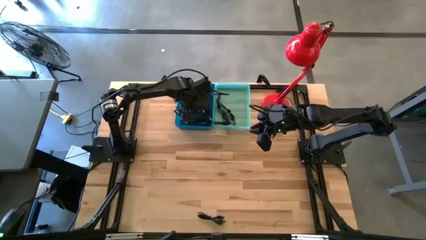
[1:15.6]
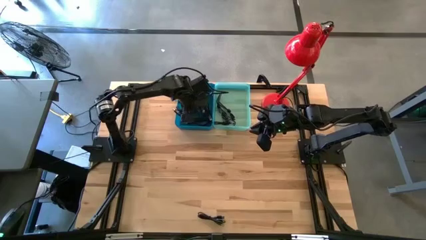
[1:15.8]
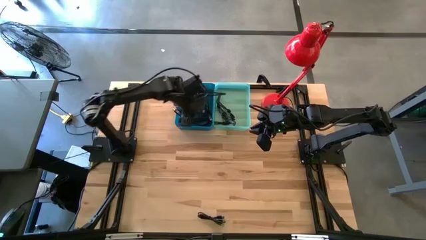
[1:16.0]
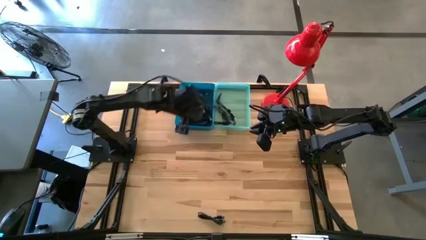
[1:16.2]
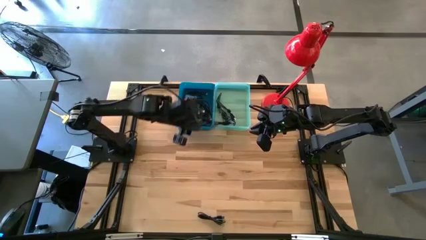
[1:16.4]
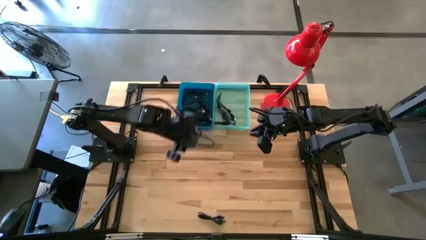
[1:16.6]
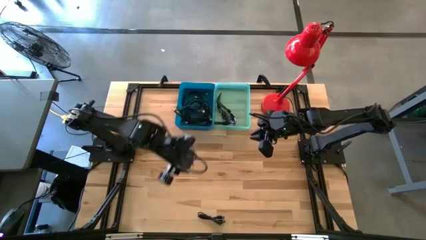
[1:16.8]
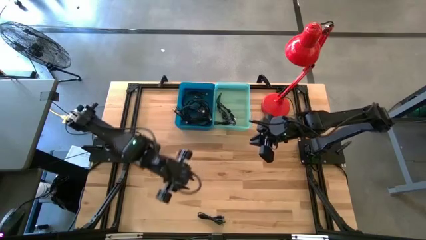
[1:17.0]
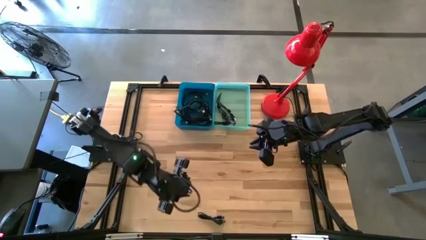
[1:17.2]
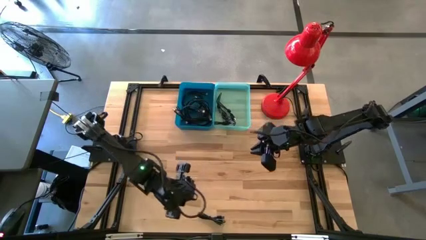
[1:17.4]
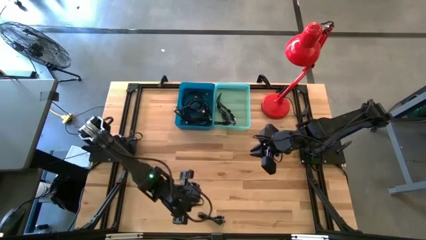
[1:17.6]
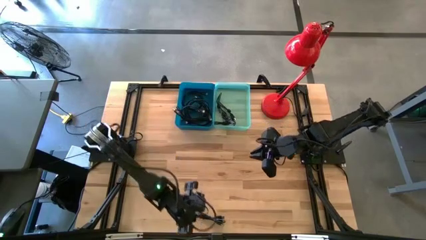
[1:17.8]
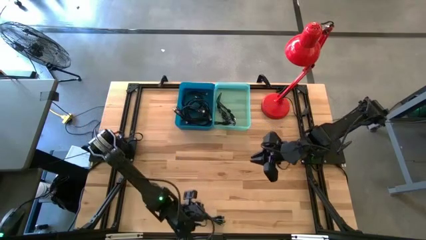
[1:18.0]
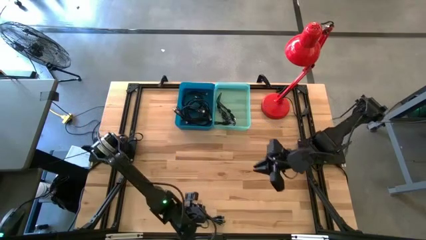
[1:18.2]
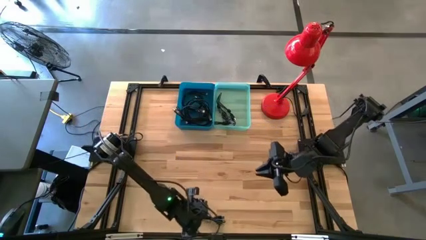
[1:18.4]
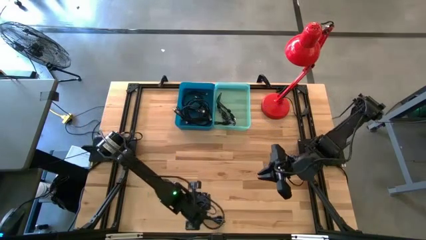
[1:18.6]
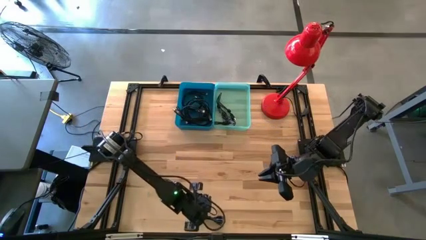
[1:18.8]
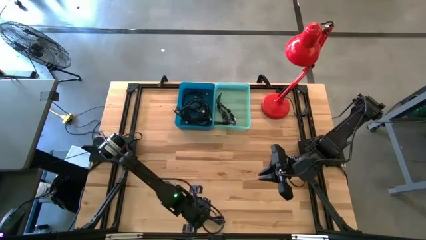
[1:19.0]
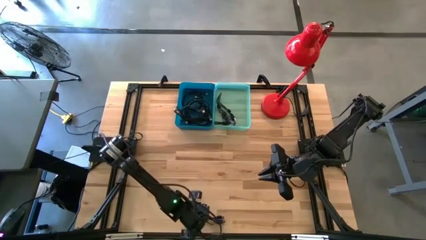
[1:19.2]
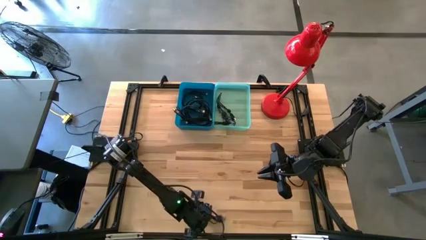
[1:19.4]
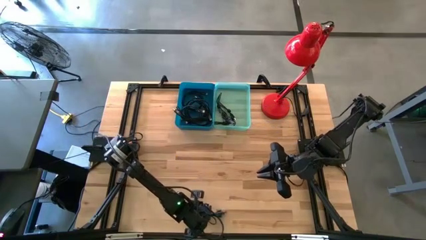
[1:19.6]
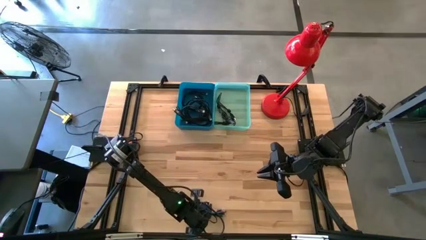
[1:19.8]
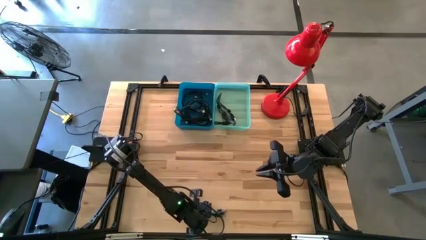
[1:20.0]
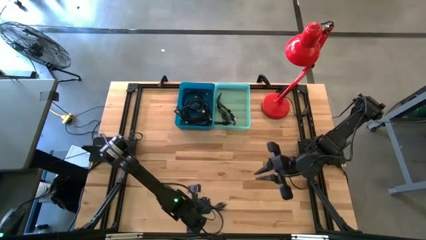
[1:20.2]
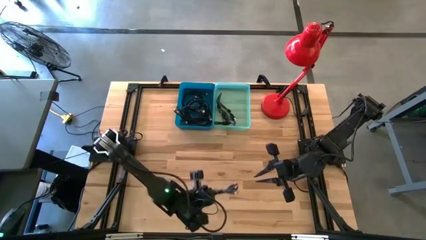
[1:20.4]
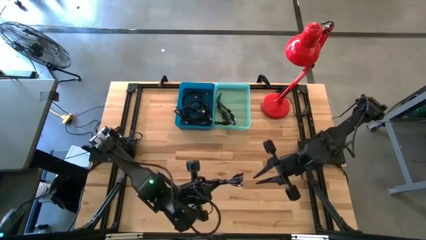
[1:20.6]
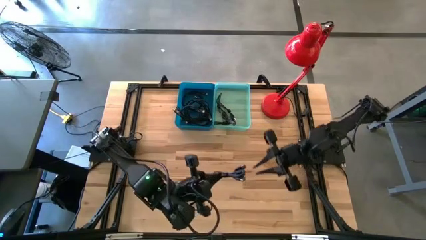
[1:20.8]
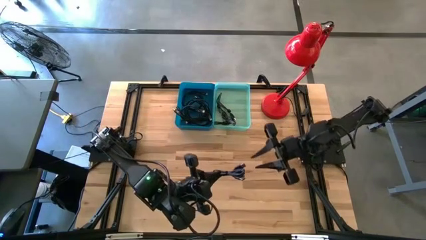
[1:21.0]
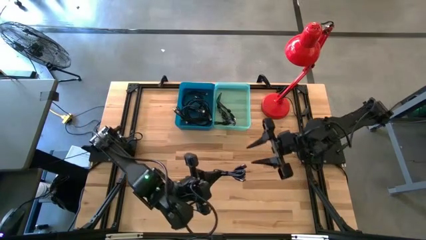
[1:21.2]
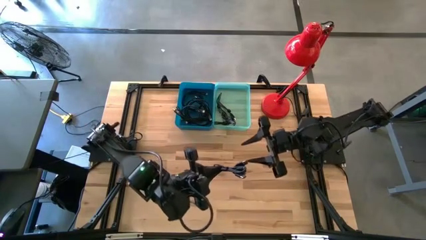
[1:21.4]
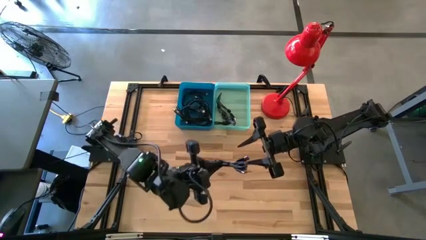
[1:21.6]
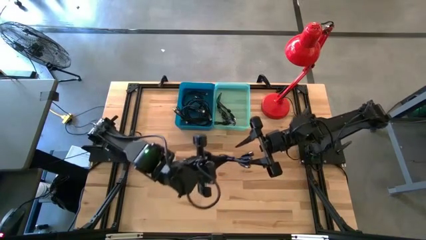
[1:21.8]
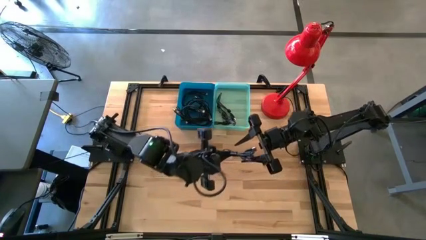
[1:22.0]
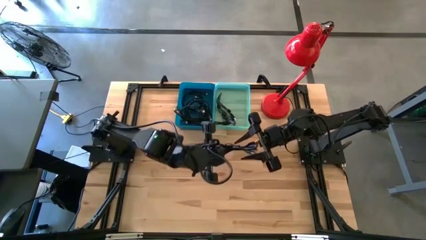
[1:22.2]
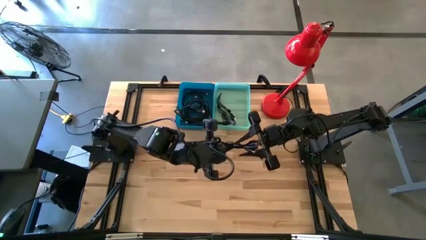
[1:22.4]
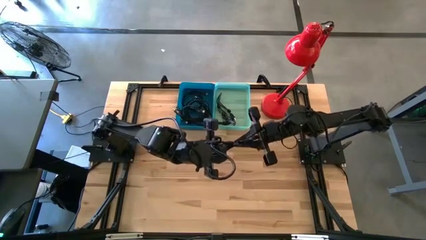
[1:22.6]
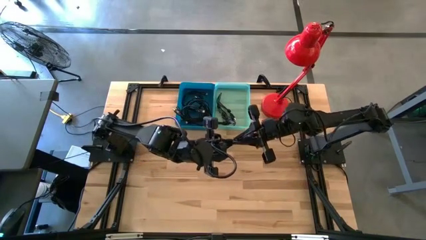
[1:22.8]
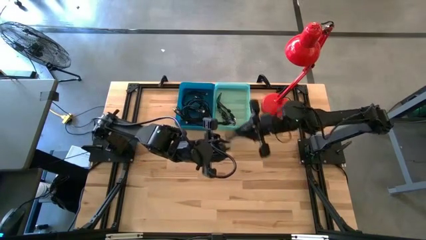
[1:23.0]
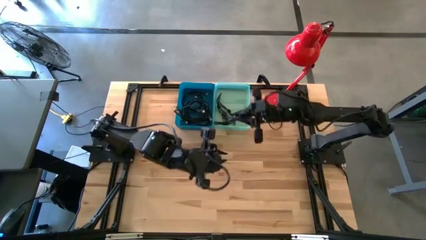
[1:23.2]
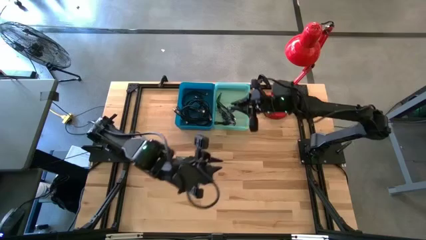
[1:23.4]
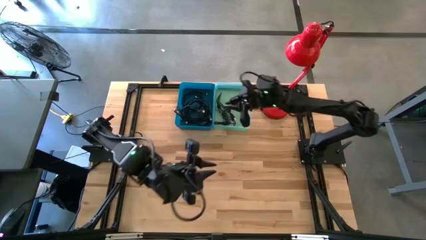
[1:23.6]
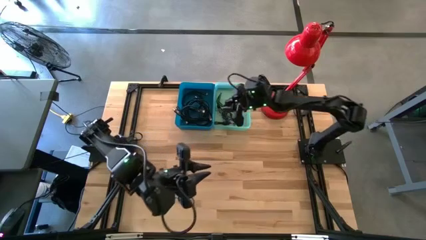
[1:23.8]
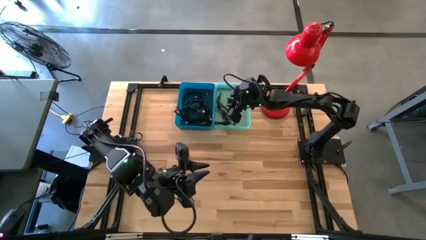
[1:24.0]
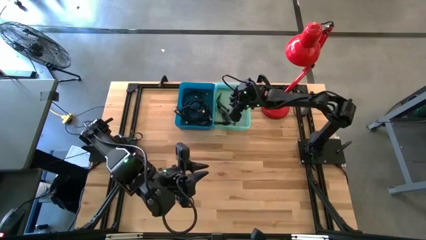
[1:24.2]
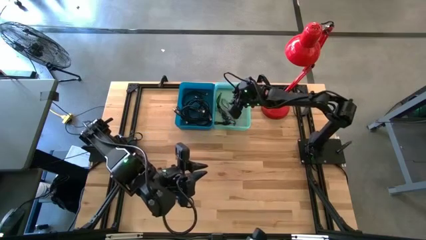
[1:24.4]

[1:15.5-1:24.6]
Task: Pick & Place USB Port
Put the black usb cable into the light blue bin

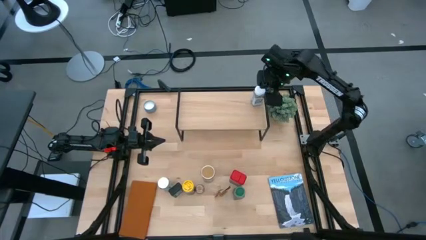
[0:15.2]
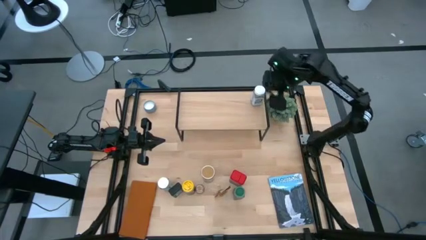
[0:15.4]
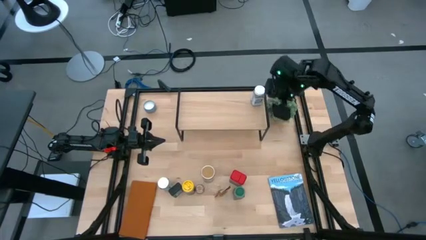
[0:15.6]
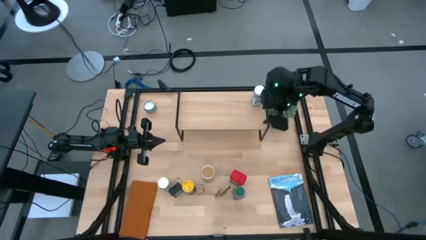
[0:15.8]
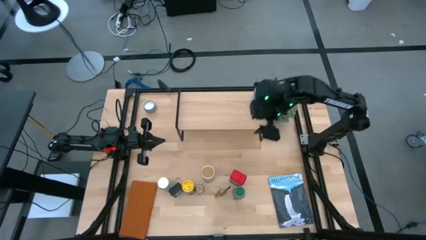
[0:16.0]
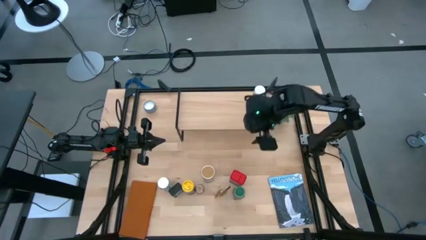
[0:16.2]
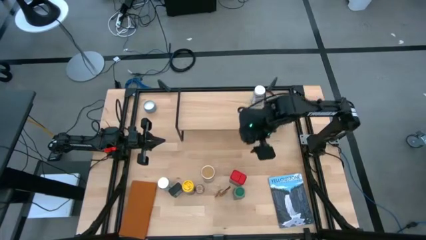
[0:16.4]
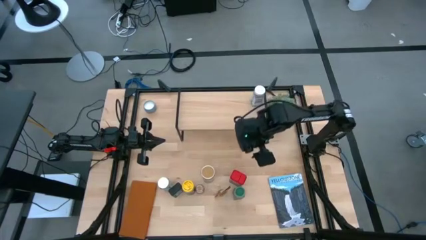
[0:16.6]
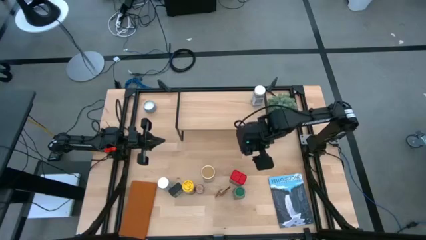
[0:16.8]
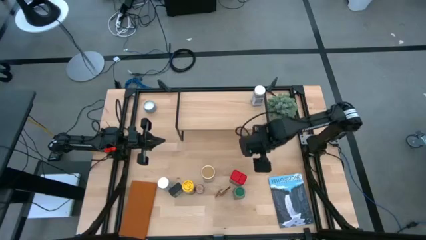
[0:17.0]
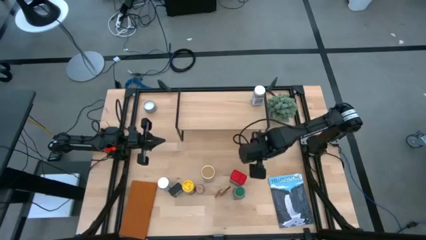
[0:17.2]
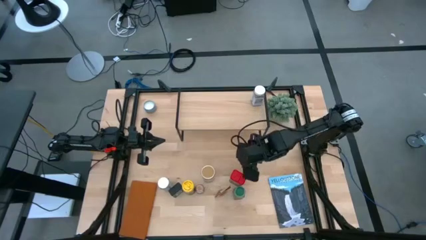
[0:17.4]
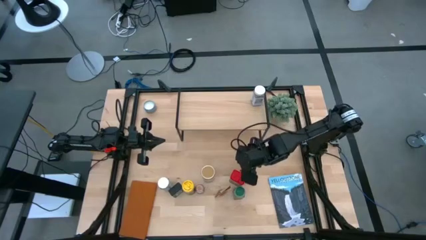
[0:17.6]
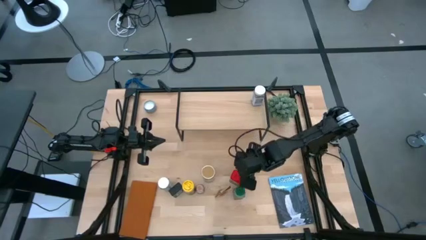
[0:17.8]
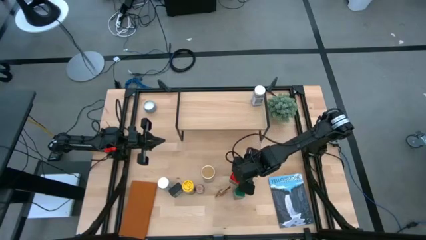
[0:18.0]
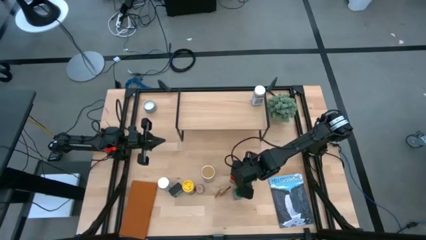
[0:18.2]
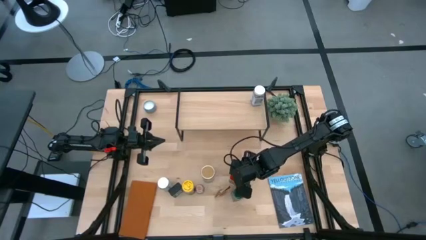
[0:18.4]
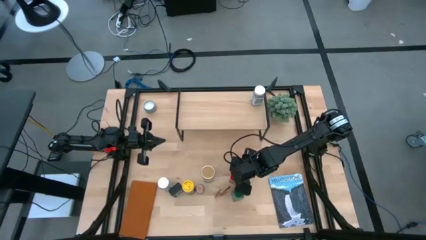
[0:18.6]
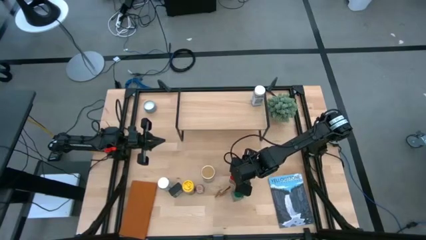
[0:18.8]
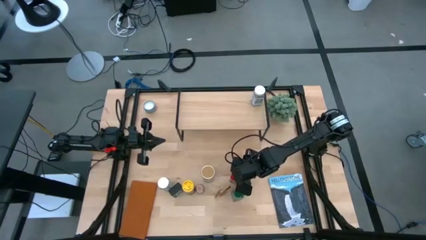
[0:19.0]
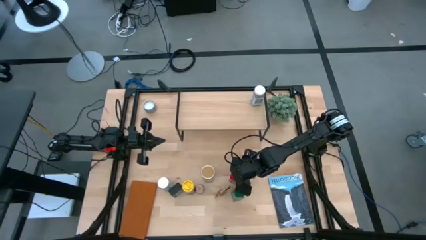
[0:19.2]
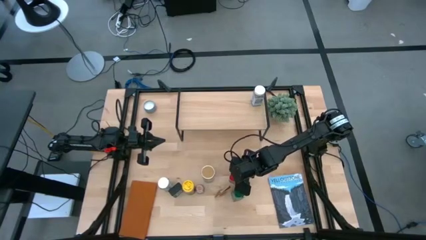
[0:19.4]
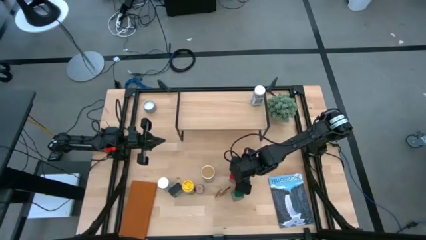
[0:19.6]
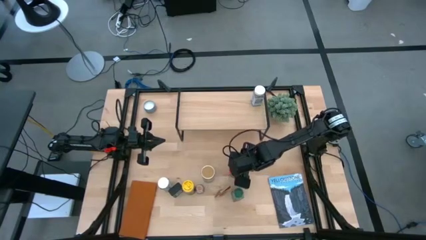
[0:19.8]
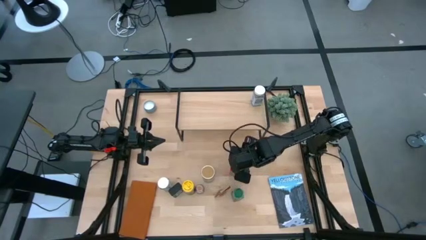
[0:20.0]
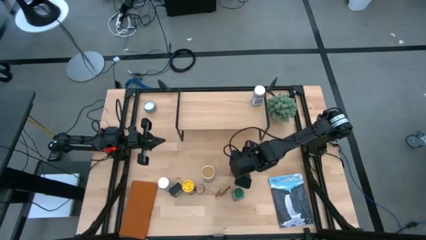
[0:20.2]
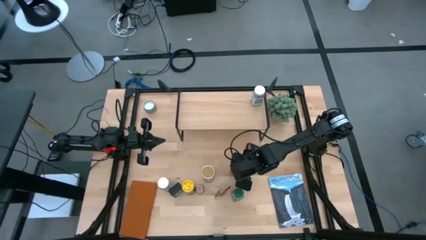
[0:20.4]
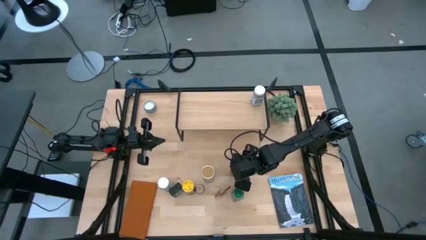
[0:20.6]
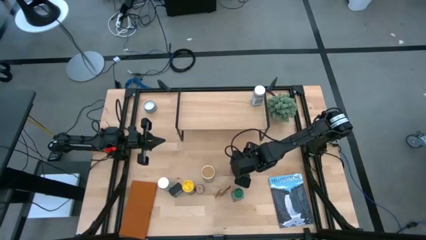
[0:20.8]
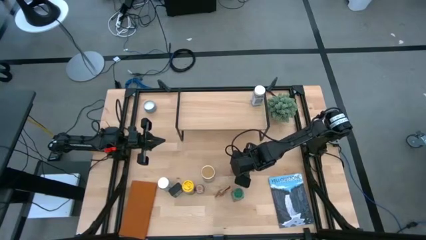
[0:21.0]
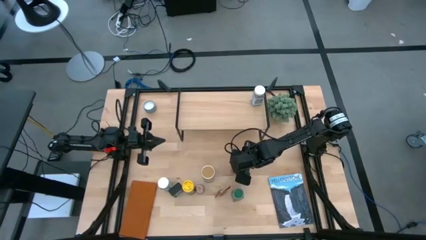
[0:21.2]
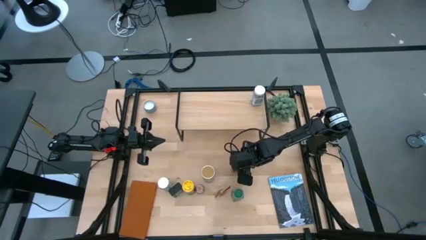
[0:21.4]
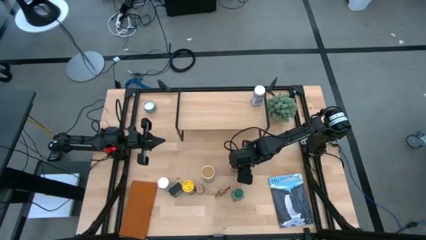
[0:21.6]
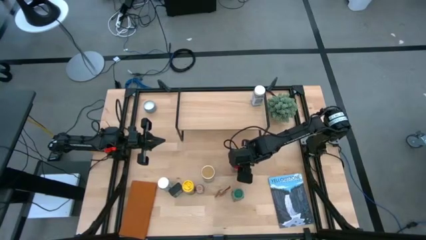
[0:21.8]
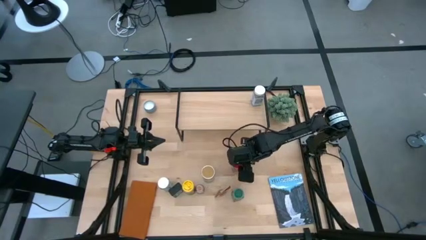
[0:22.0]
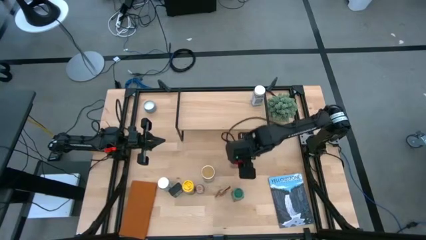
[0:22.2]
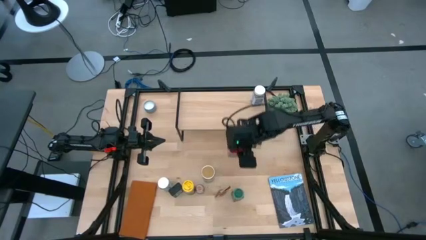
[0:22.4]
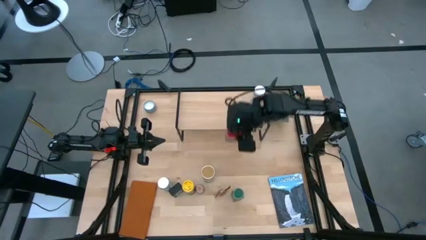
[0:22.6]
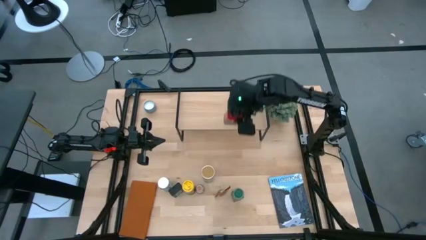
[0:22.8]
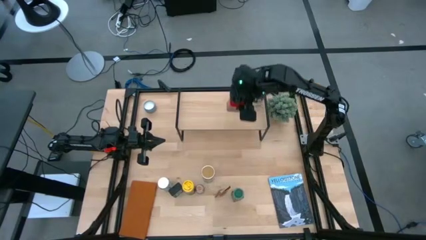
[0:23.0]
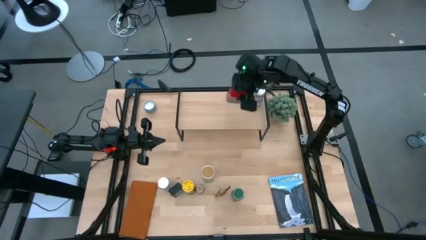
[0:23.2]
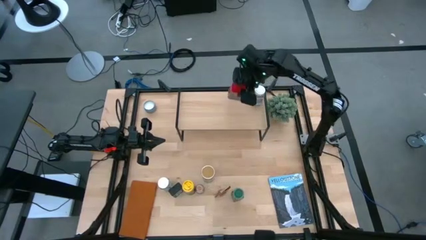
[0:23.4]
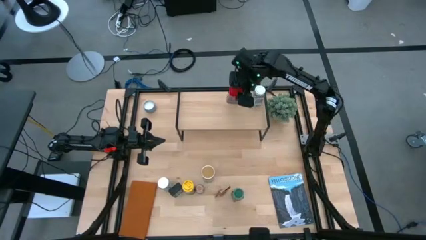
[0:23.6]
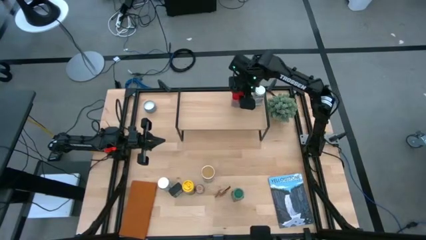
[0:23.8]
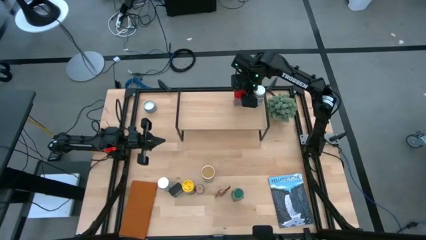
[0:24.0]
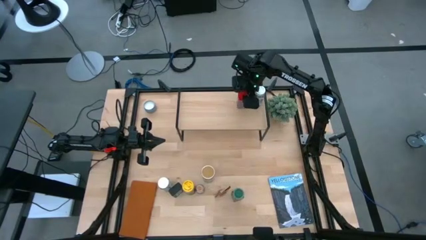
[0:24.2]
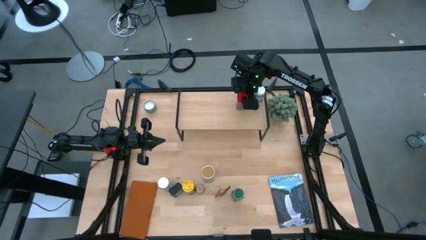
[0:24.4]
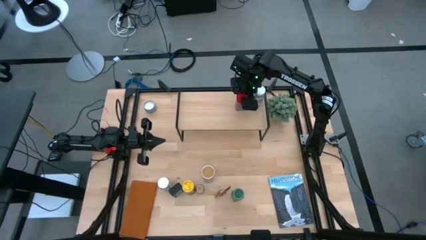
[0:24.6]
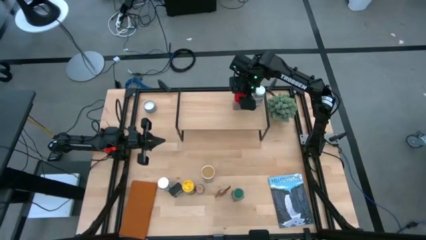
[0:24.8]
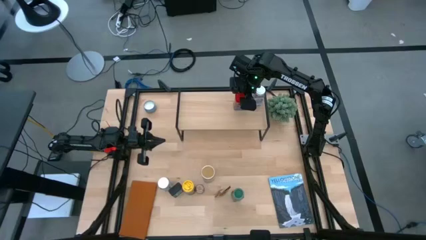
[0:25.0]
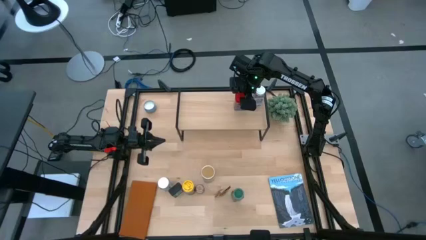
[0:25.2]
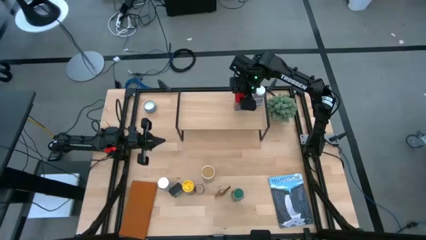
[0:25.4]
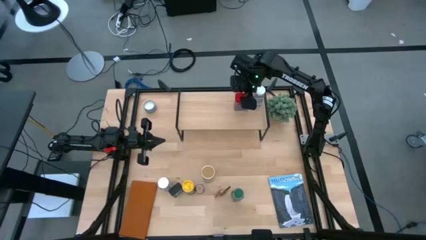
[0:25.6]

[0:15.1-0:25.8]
Task: Shelf spices
Put the red seasoning can on the shelf
